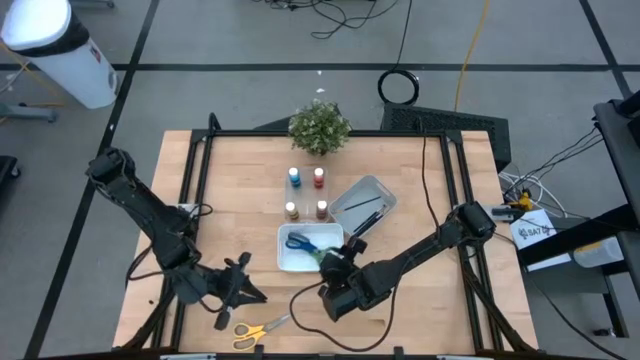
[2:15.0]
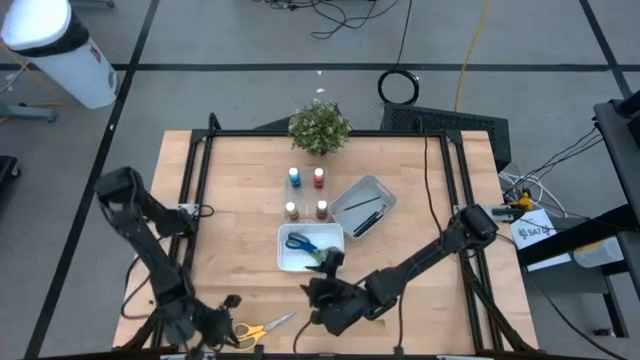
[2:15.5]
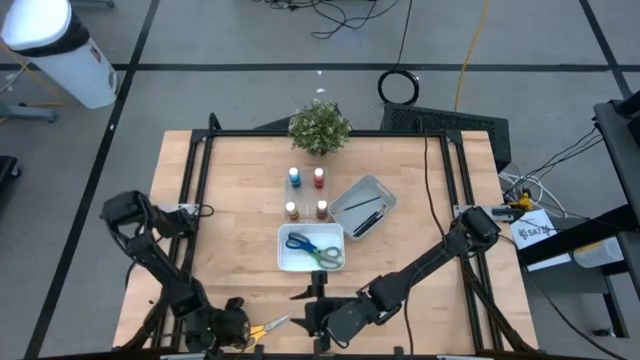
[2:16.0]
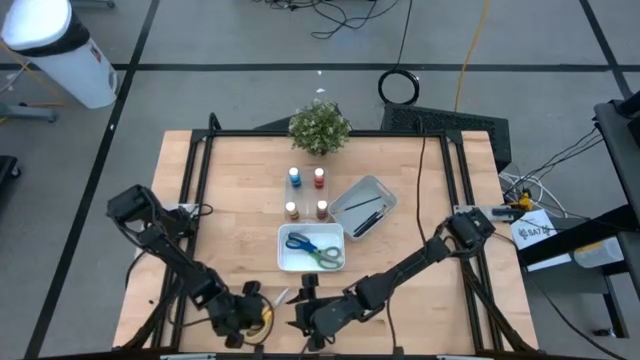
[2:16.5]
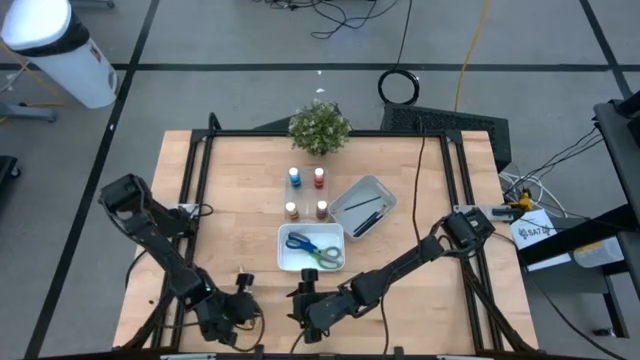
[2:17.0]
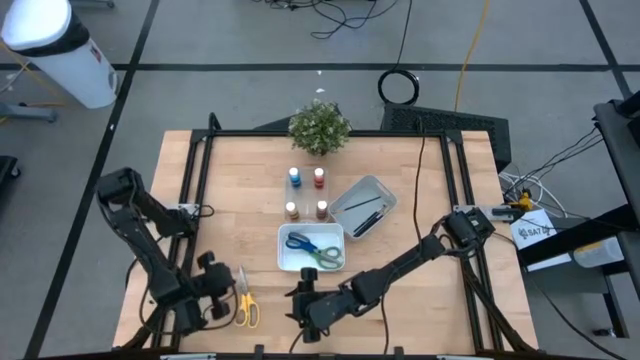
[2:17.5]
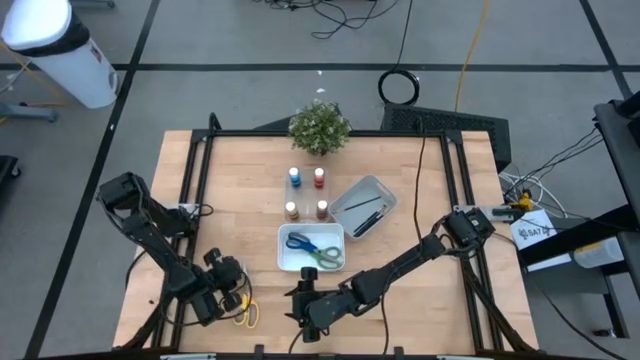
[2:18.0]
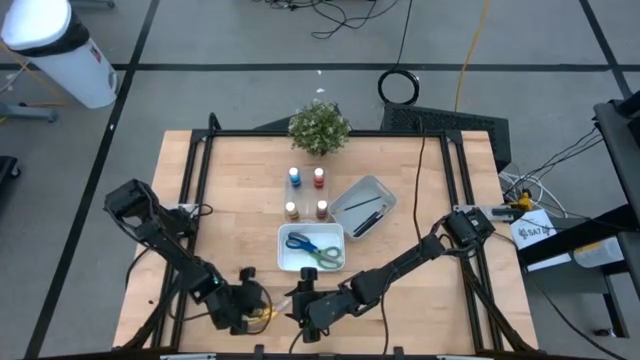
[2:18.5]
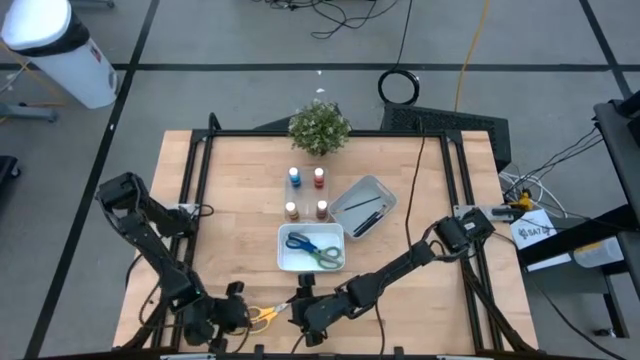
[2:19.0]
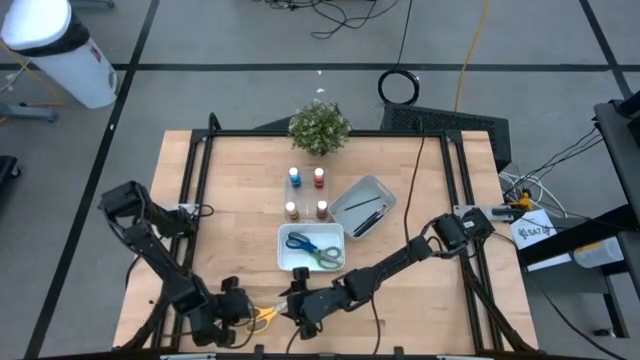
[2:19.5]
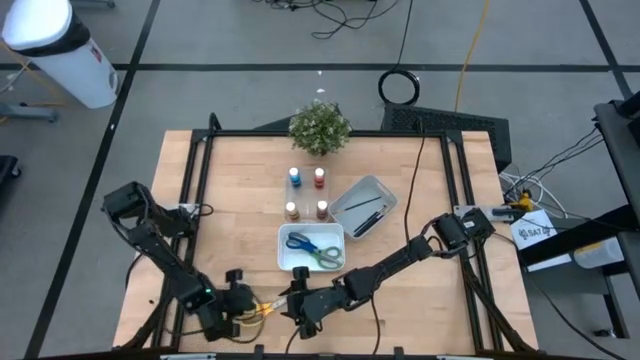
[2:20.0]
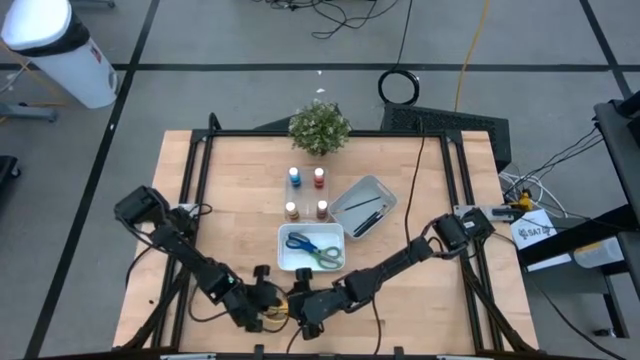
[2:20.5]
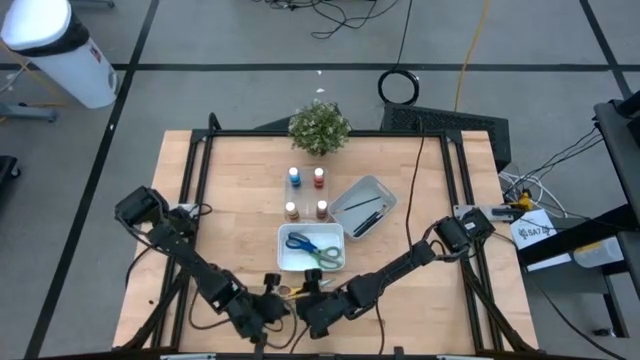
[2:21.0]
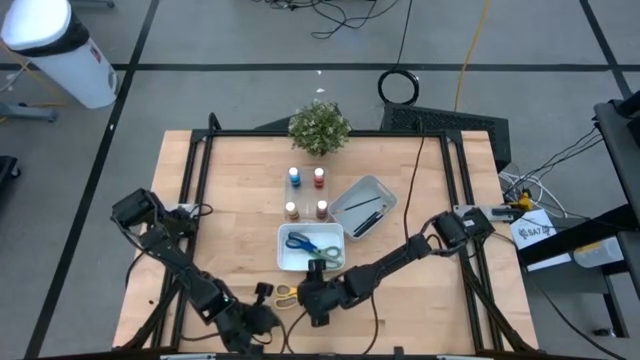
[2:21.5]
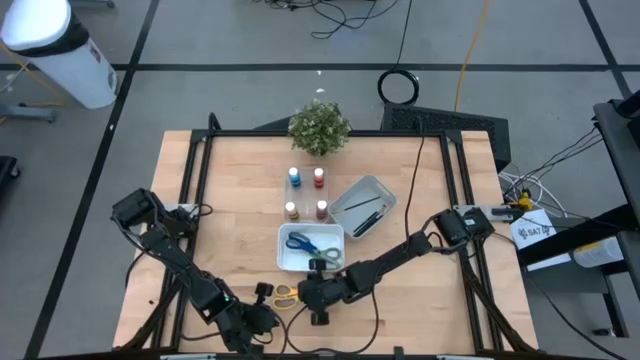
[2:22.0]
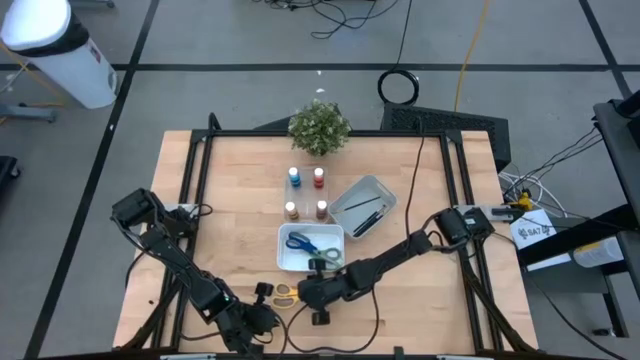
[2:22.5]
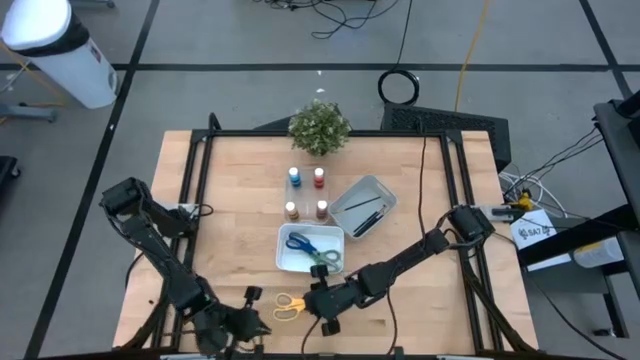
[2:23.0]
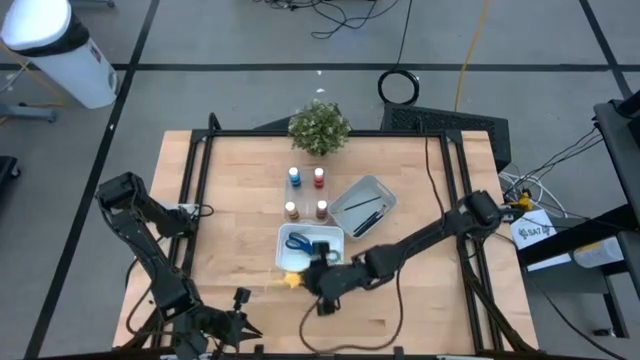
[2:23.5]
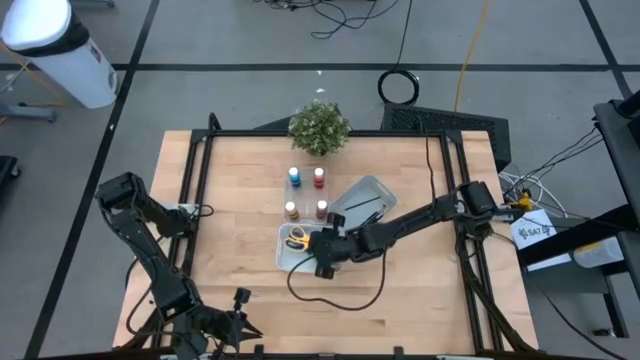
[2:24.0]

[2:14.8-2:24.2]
Task: Pick & Place Paint Supplies
Put the yellow scissors into the white bin

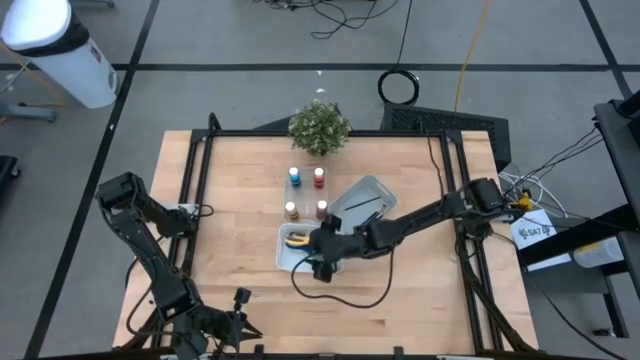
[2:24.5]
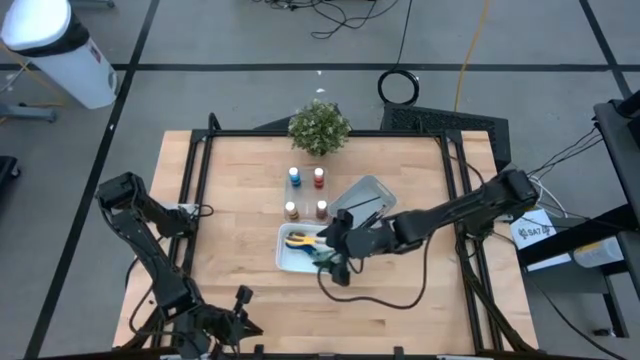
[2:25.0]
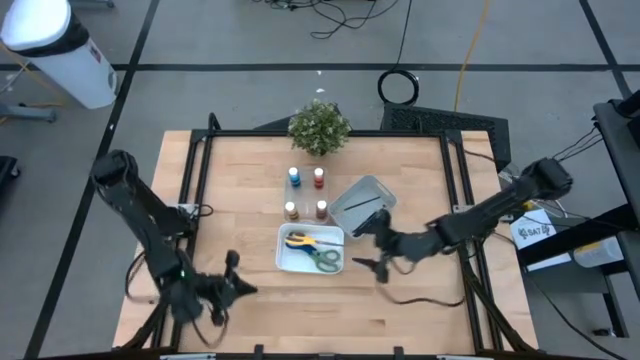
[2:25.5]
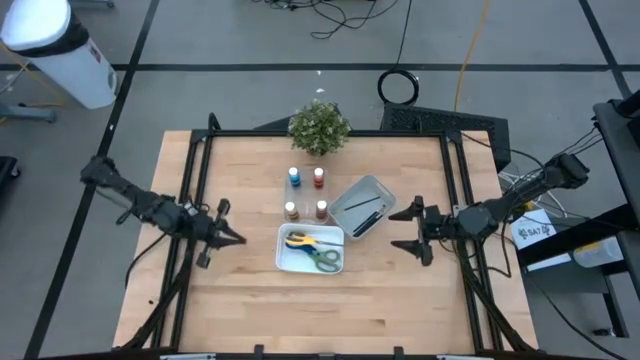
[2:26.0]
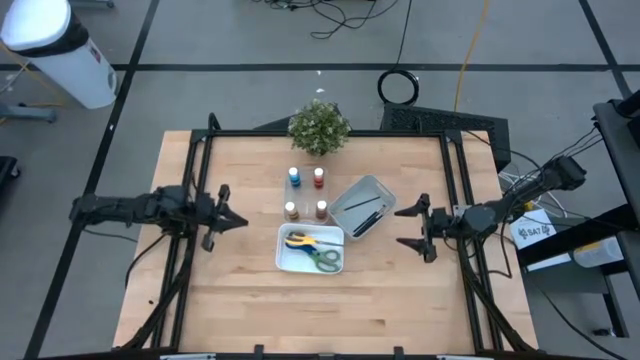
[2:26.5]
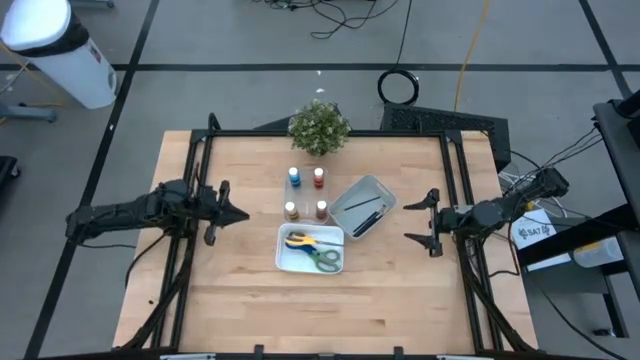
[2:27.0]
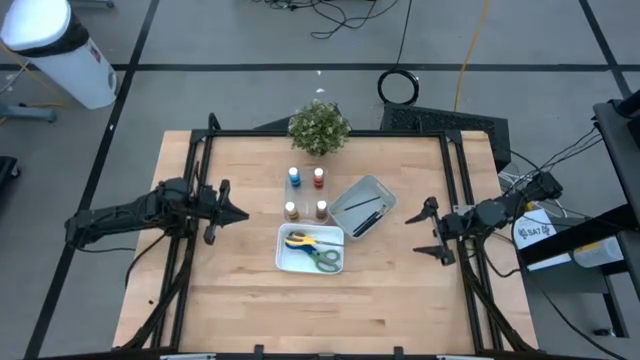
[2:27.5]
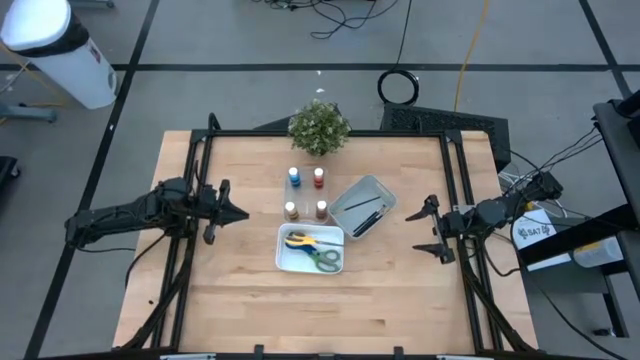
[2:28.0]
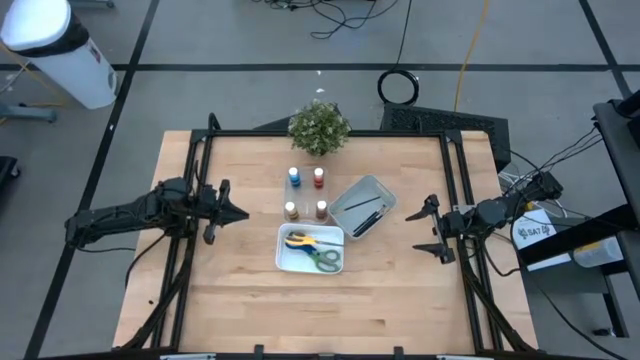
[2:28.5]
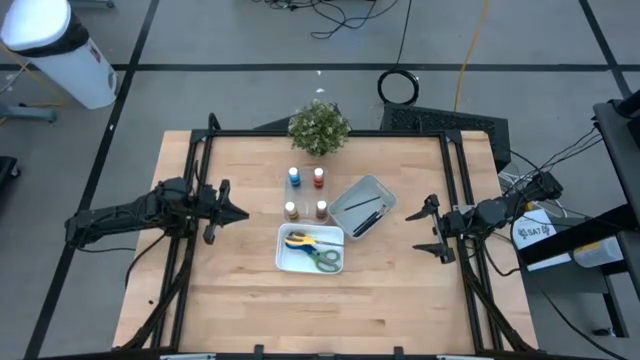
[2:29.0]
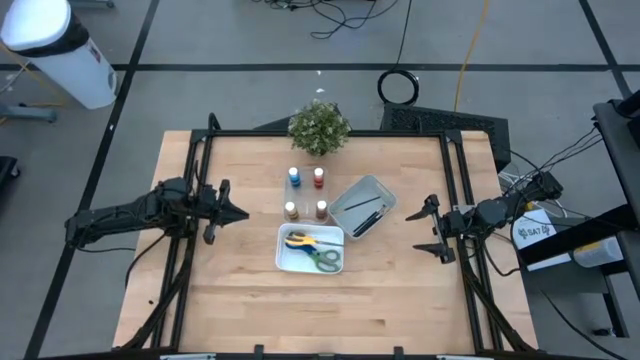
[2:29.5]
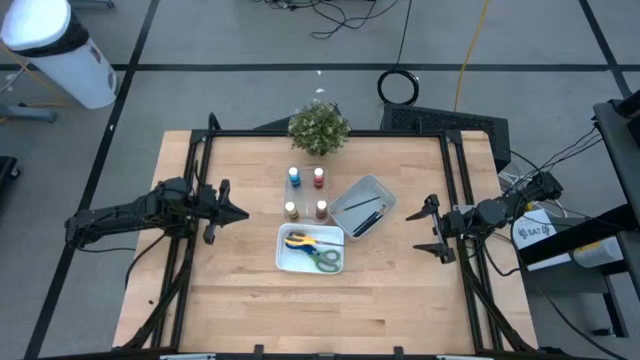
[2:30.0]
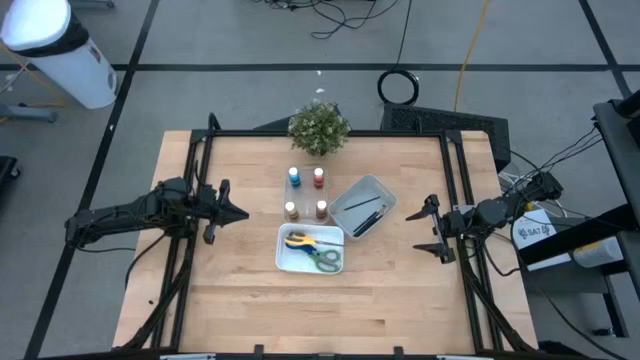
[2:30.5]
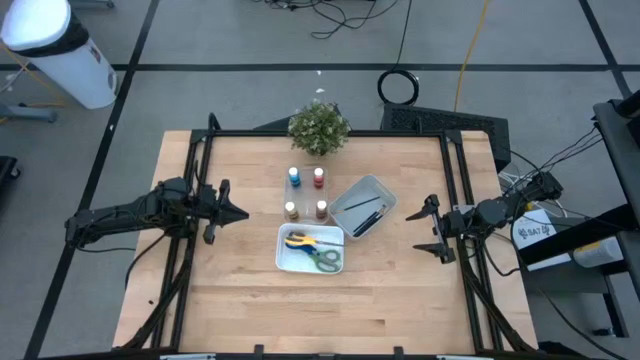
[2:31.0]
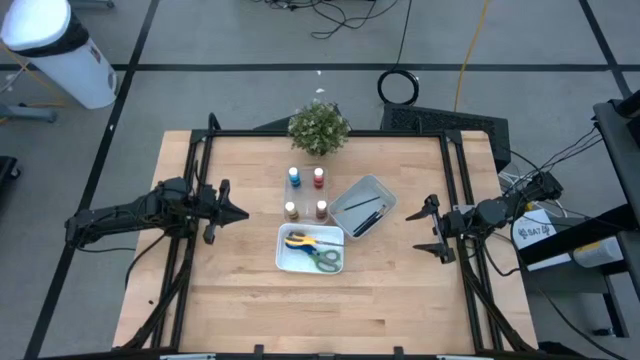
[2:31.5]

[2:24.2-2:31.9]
Return to Home Position

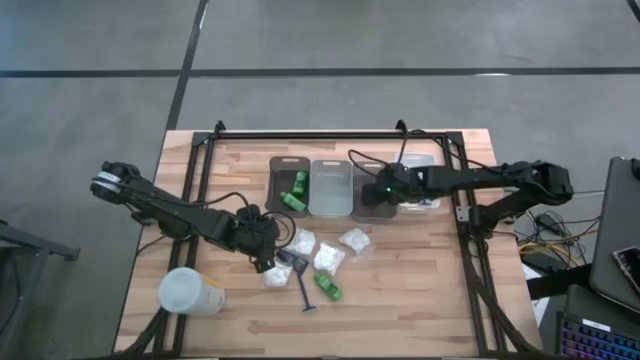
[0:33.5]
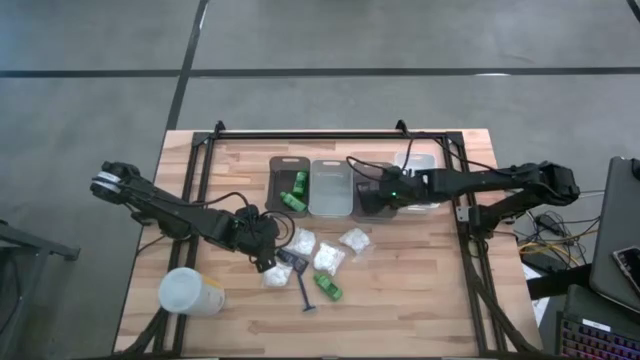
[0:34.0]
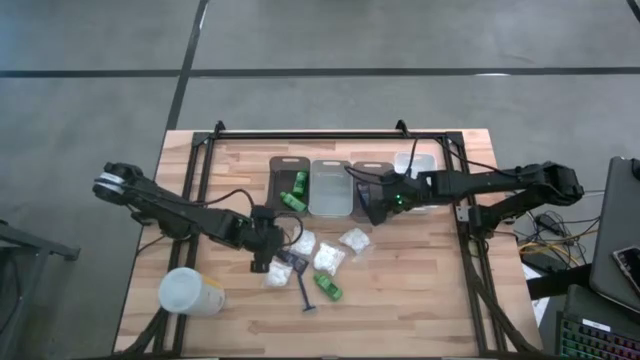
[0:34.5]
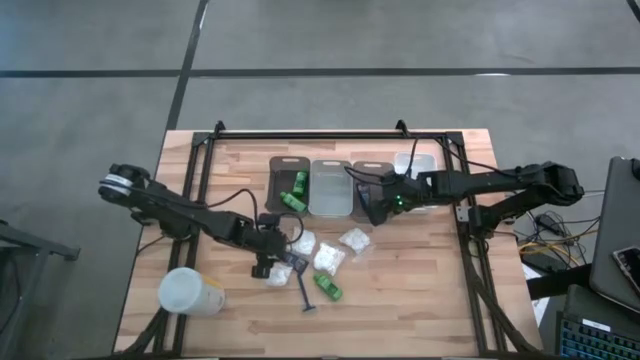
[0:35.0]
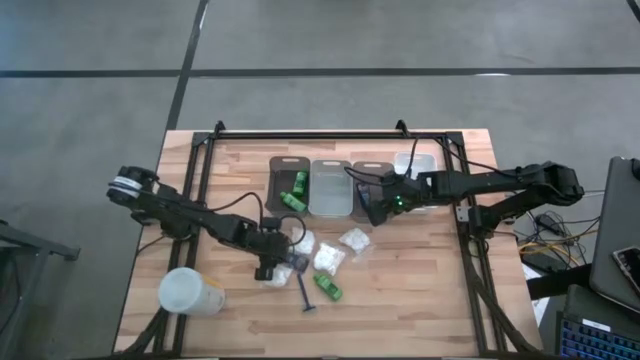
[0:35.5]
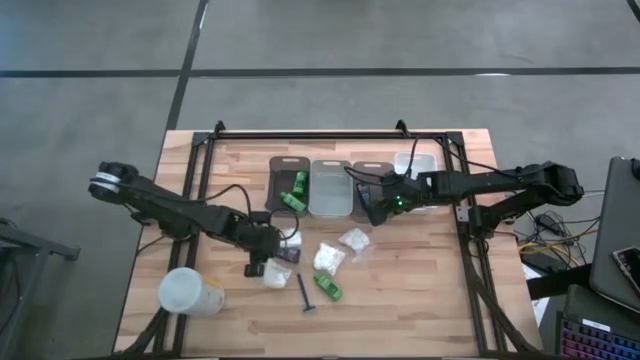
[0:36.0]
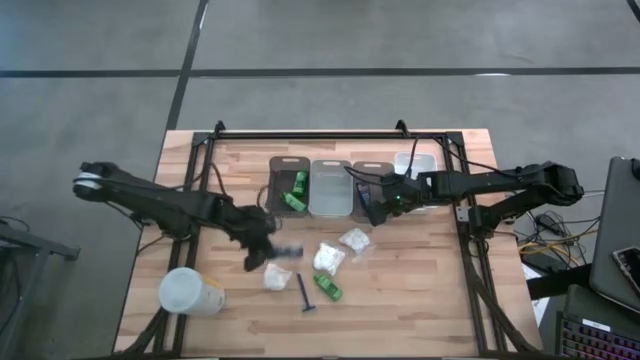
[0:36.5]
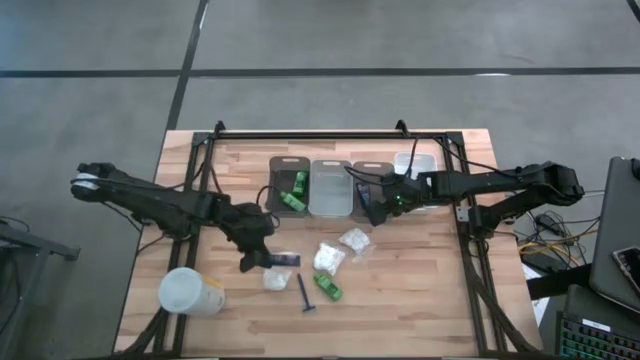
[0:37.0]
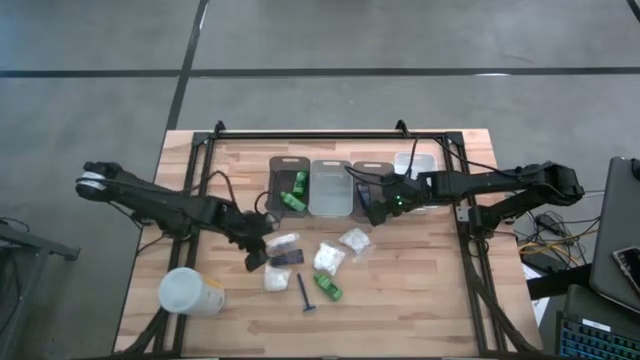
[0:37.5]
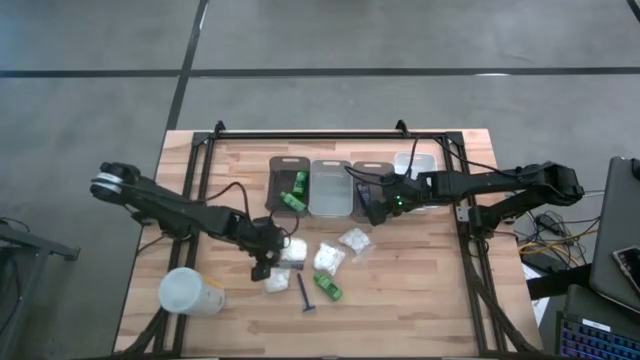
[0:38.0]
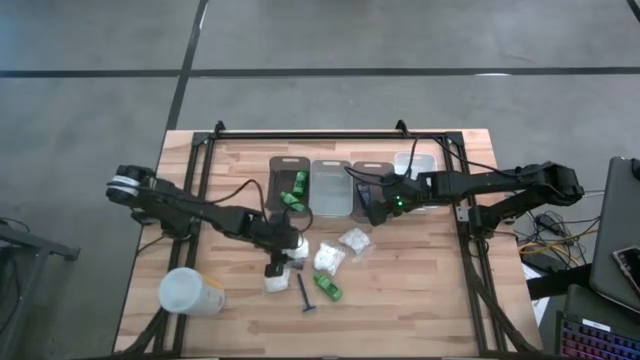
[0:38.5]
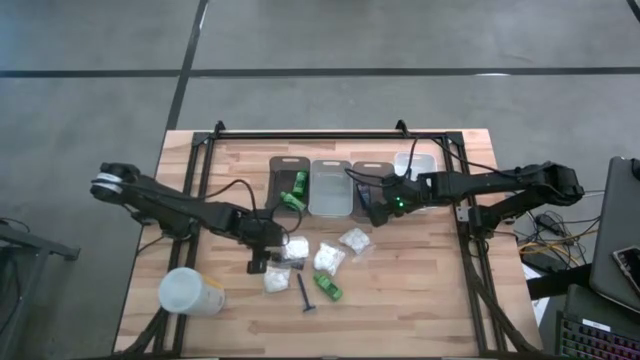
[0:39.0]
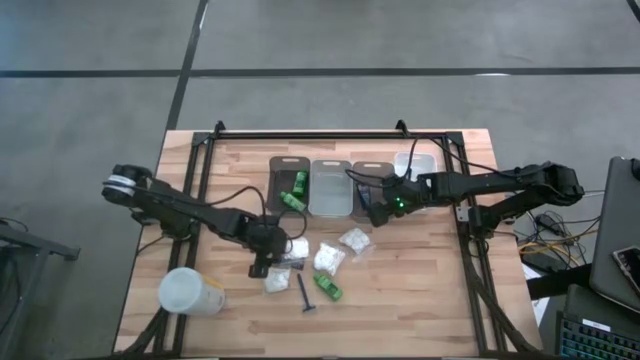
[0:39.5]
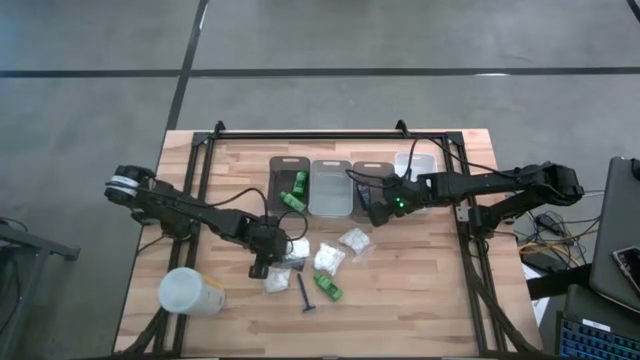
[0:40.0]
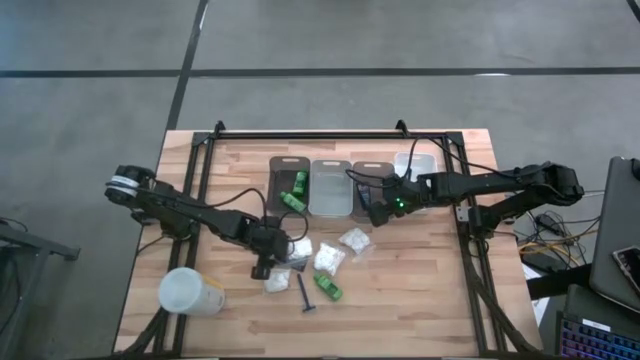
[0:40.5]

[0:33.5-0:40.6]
Task: Pick & Place Travel size toiletries
Put the blue shave cream into the right black bin
